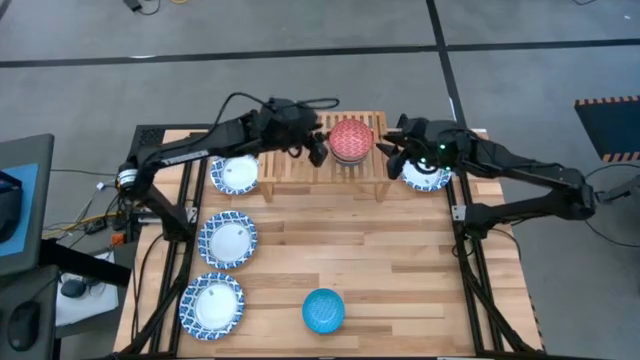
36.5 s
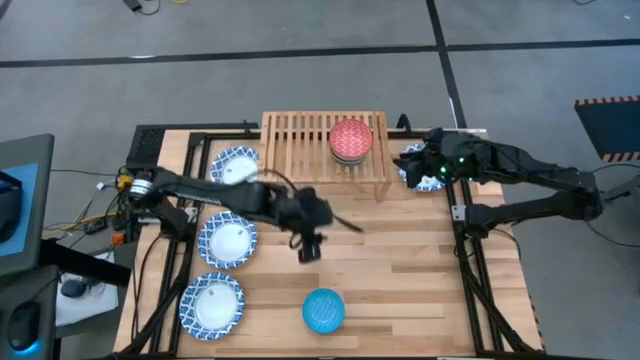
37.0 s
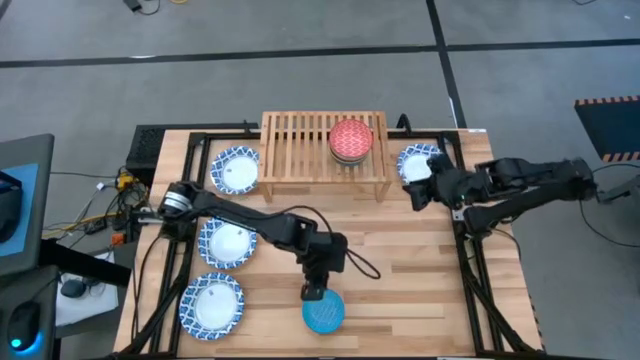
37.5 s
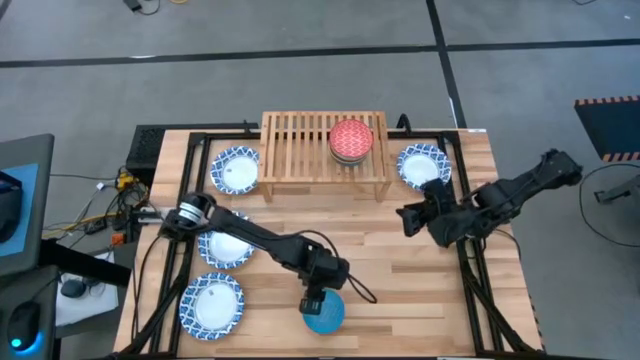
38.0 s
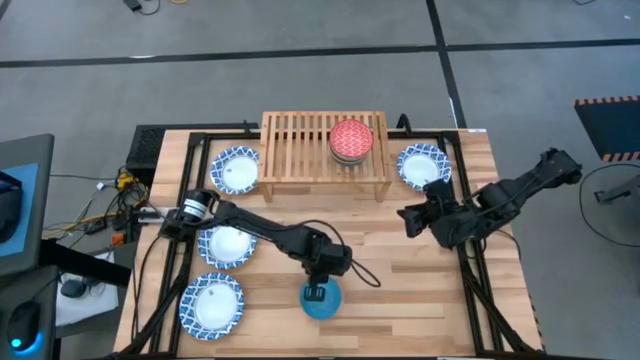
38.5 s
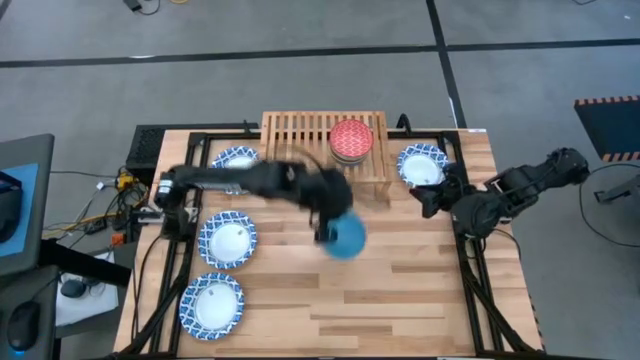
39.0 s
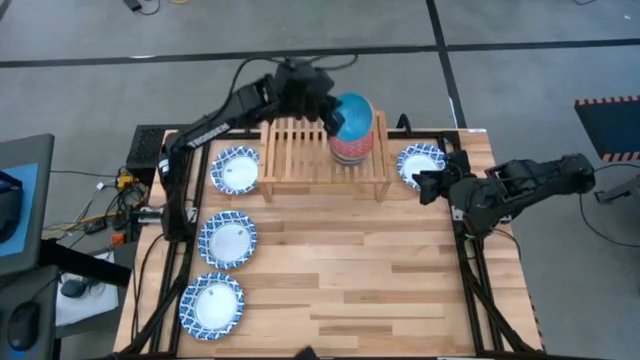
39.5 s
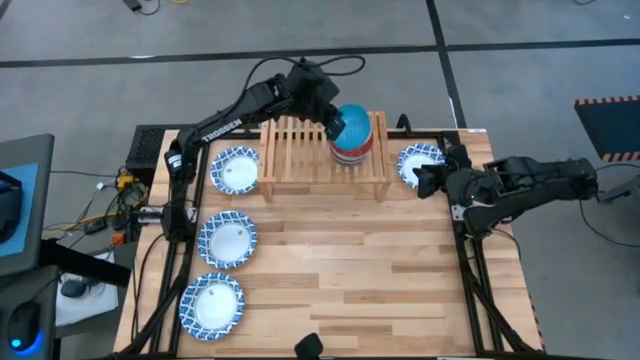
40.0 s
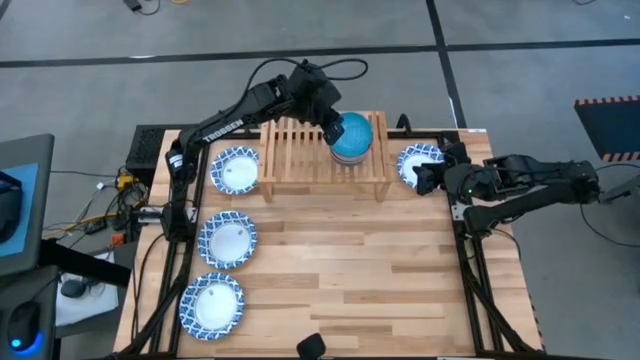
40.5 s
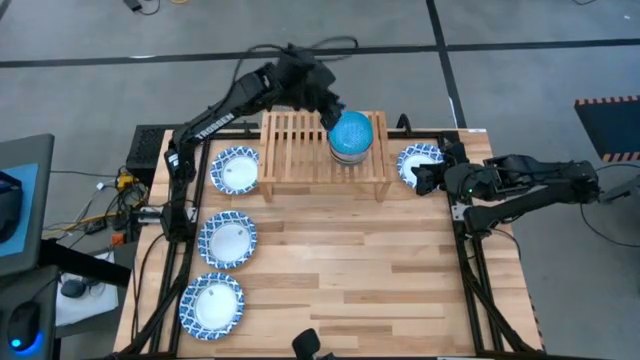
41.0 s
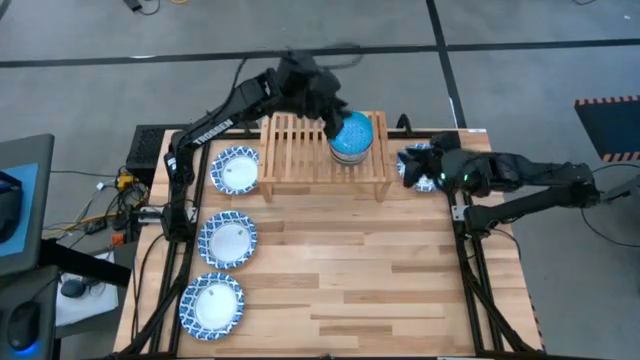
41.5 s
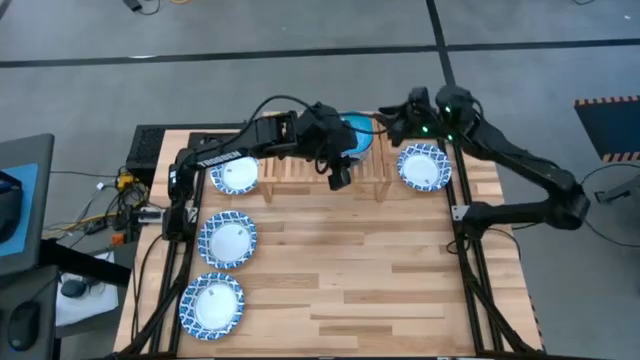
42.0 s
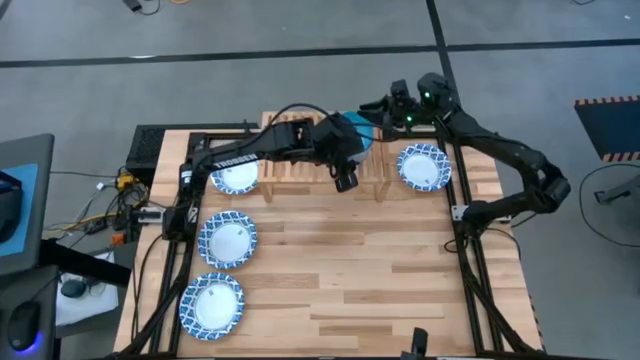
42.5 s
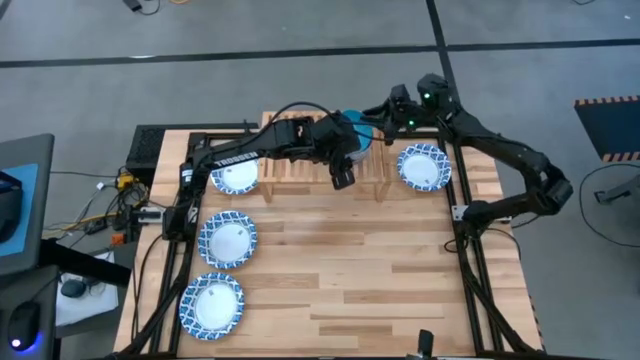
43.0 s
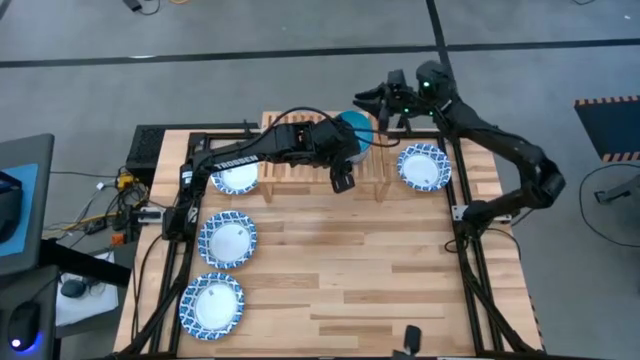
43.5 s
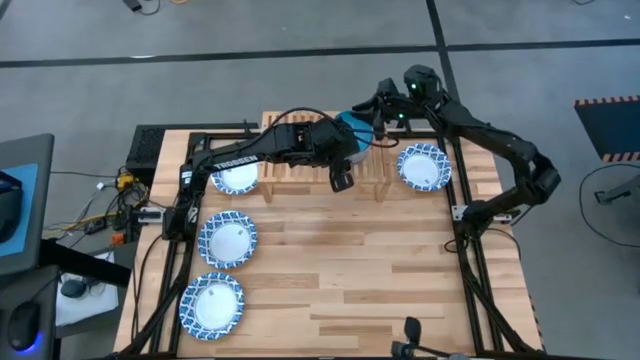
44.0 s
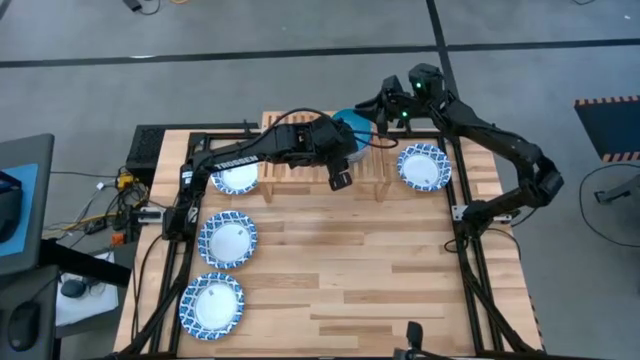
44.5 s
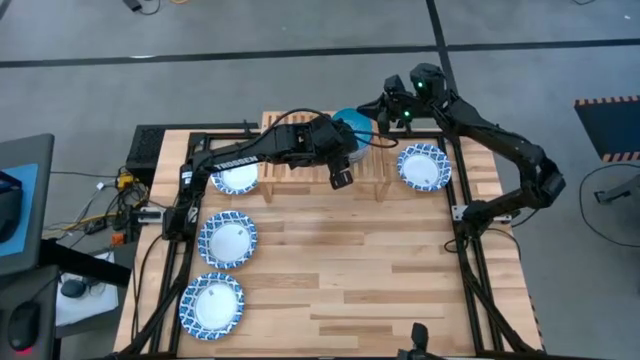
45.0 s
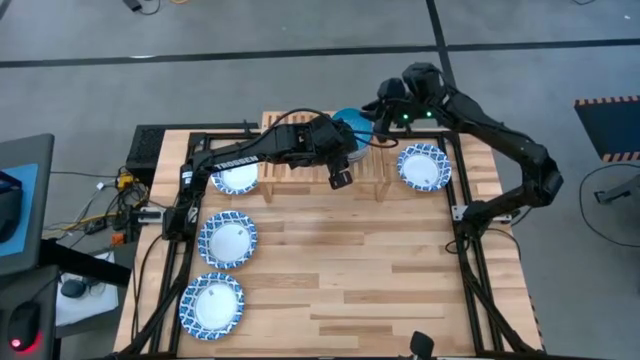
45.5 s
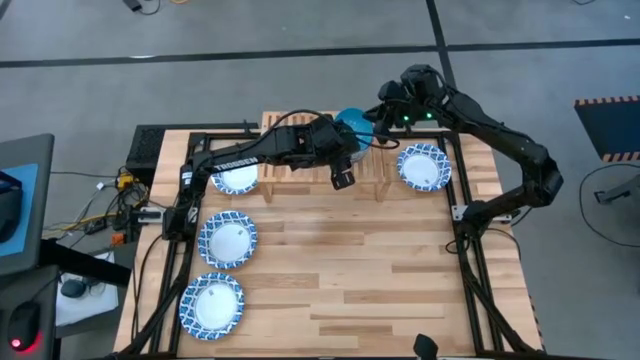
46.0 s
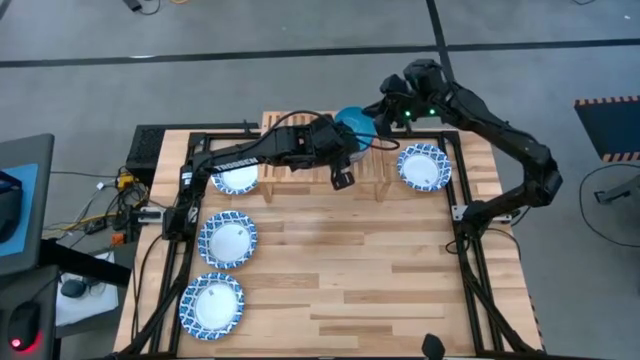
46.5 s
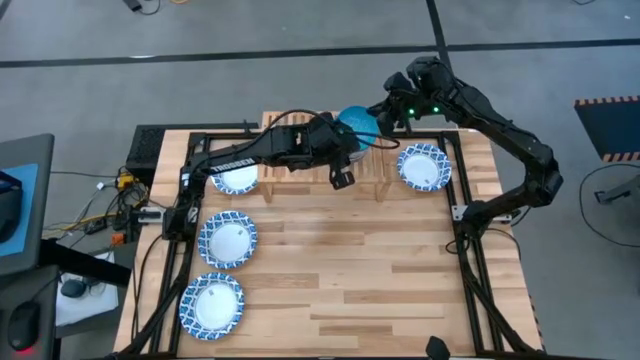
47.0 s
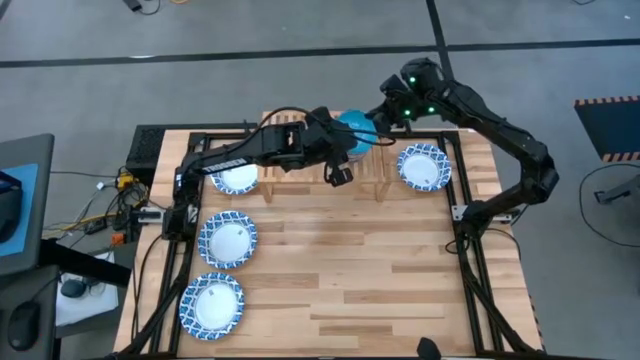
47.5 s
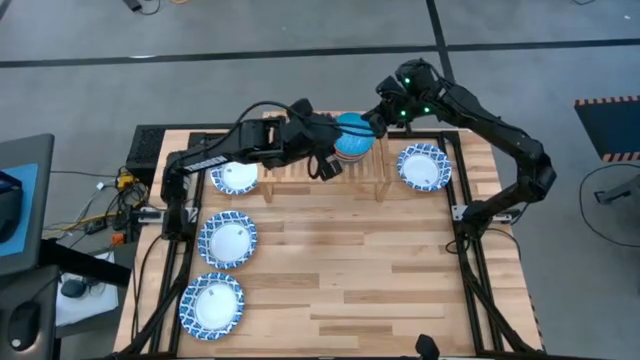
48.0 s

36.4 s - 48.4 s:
Task: Place and stack bowls onto a shelf
Stack the light blue bowl on top of the red bowl

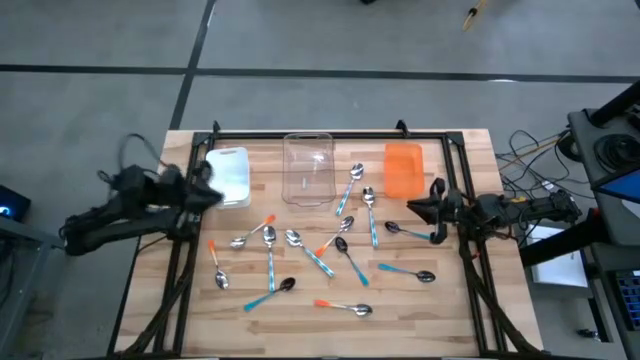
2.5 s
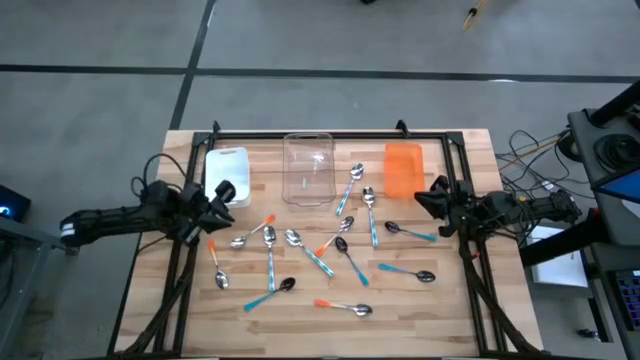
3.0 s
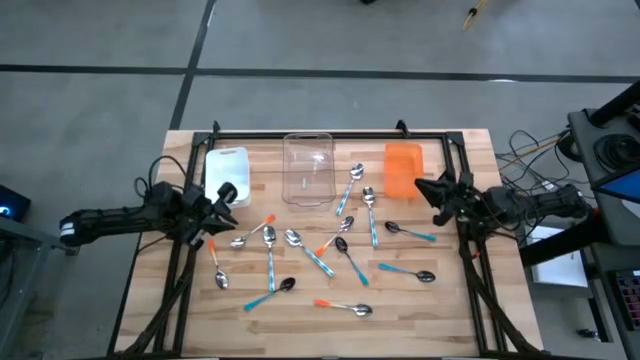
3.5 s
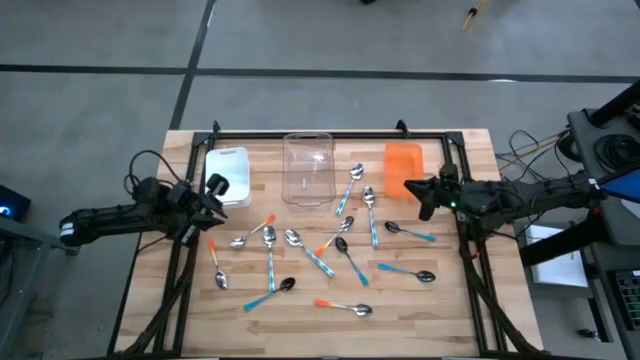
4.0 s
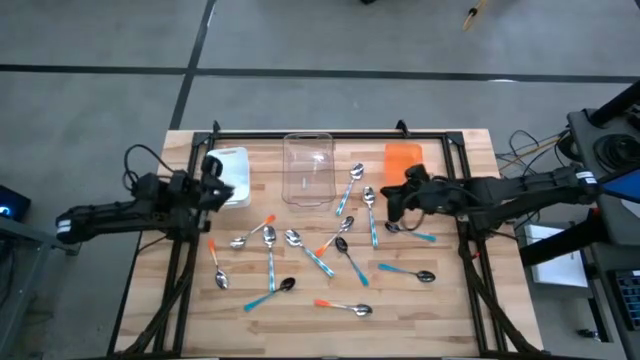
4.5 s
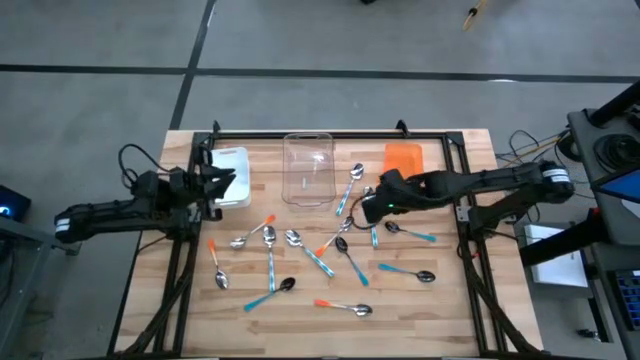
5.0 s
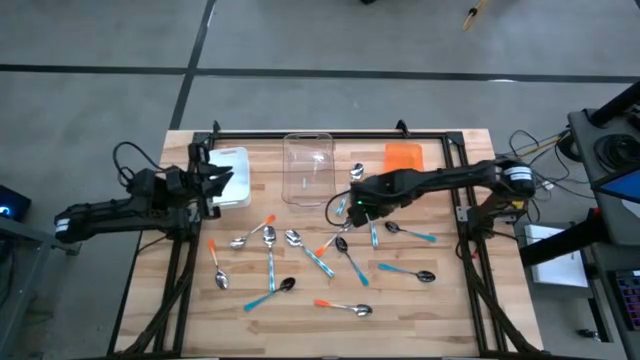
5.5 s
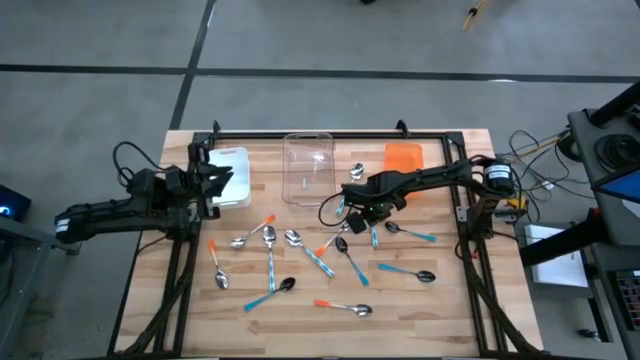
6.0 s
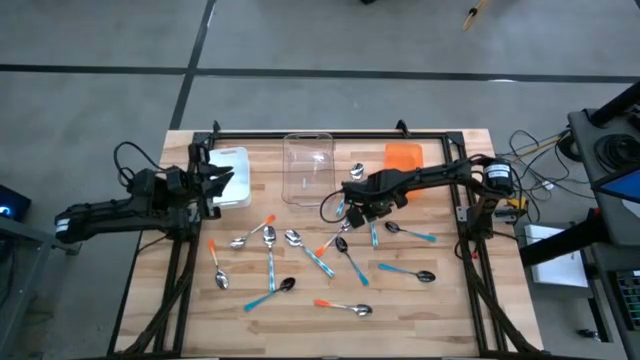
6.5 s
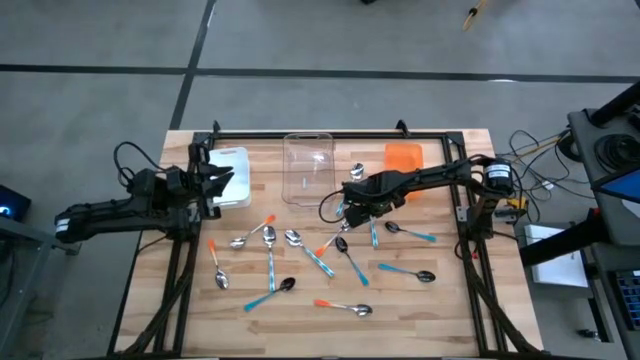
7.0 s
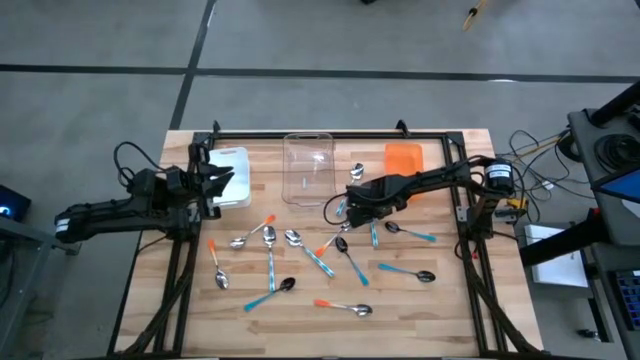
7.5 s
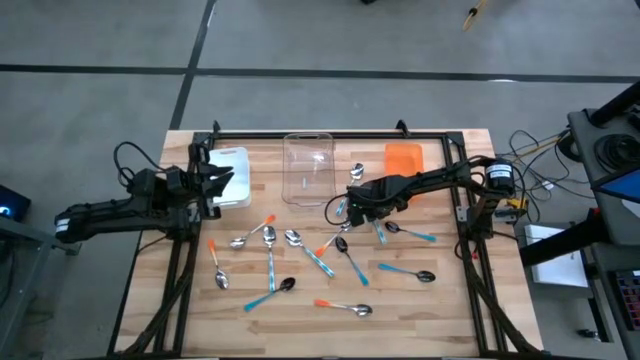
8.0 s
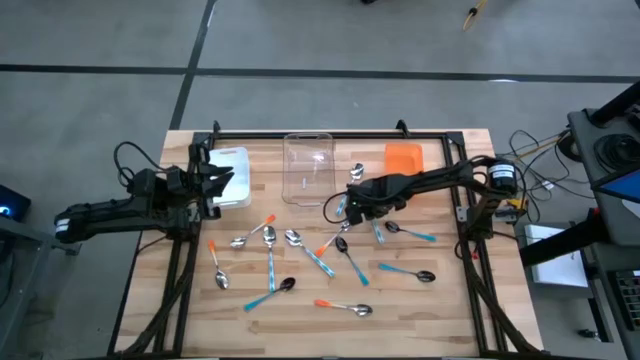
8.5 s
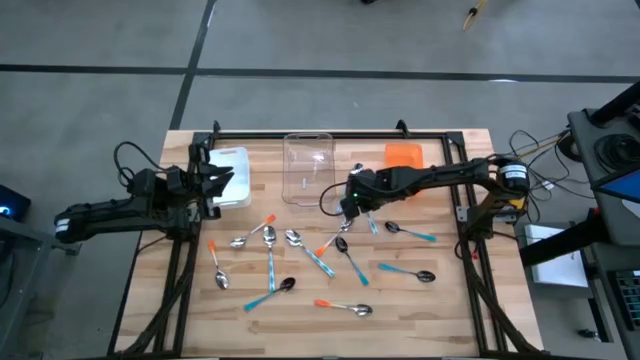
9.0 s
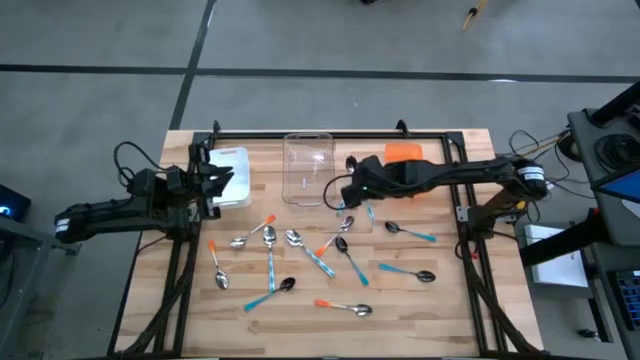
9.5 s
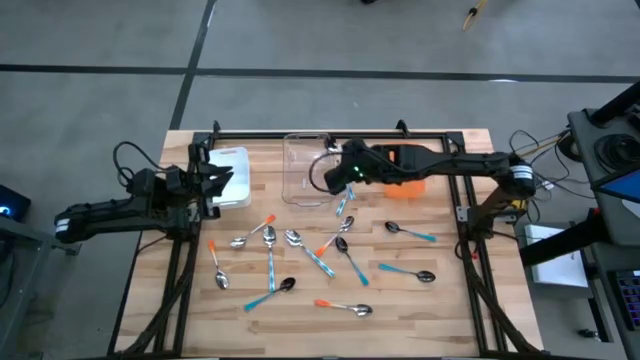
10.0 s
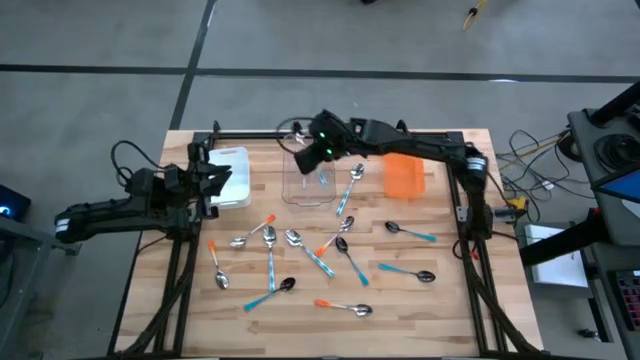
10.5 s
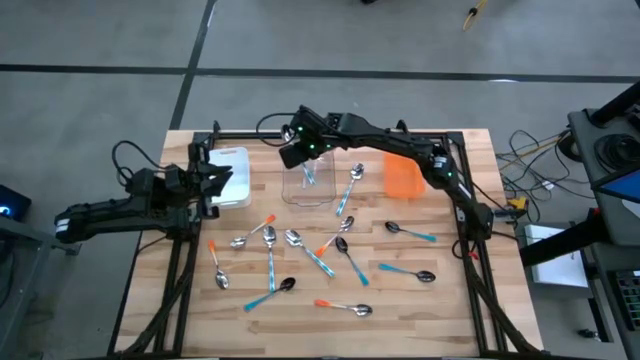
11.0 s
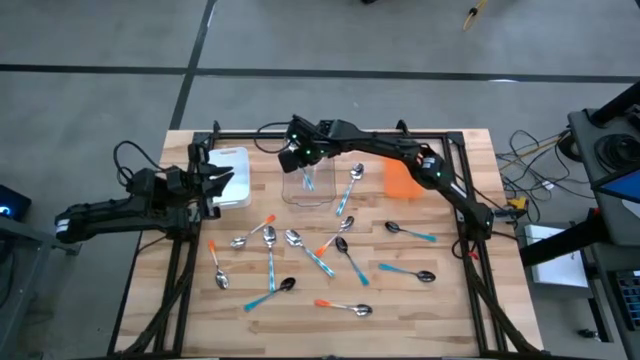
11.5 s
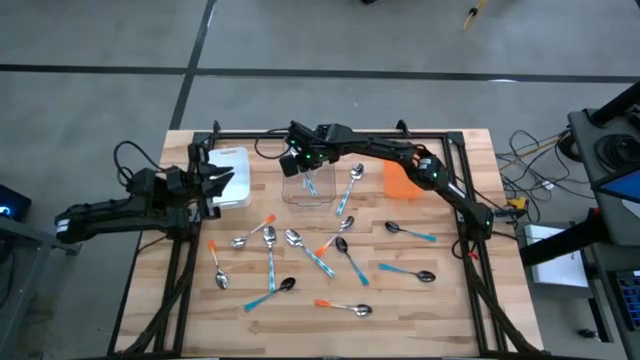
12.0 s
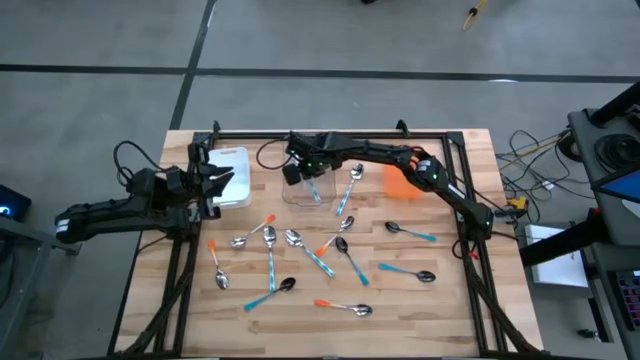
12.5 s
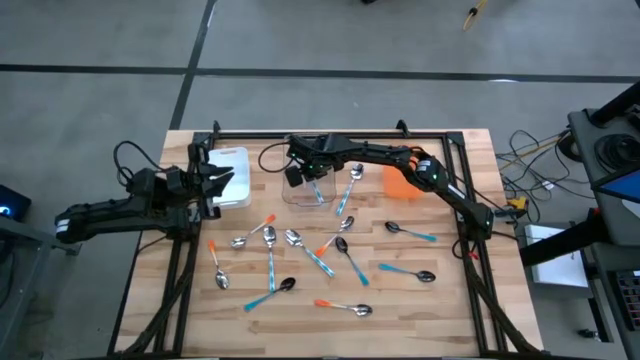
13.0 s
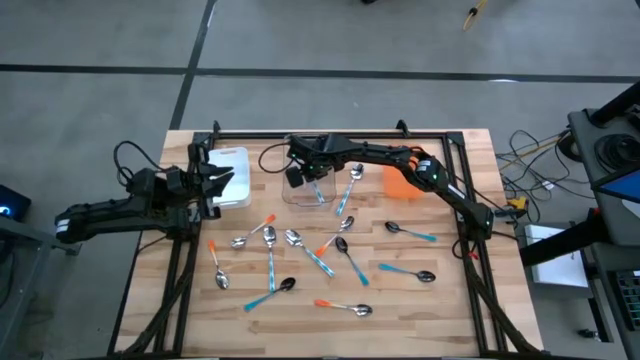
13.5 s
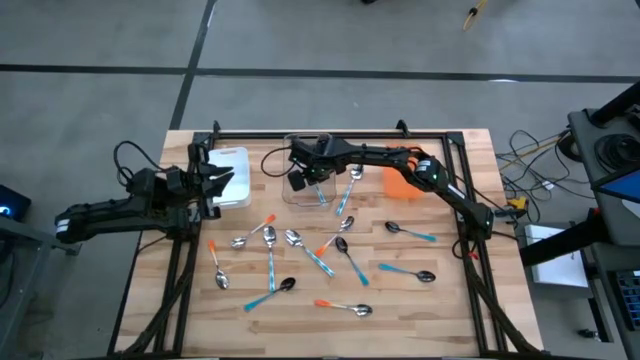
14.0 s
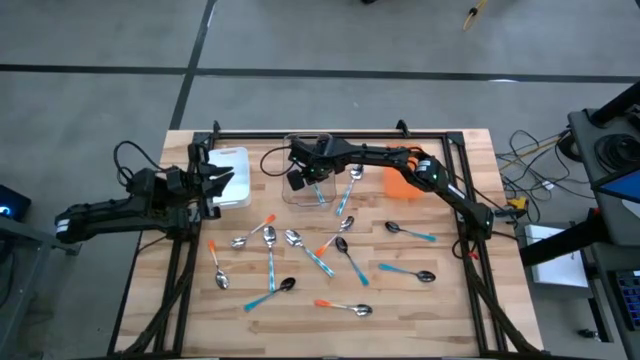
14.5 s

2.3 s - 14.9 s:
Task: Sort silverware by color (type)
Put the blue patterned spoon into the transparent bin
